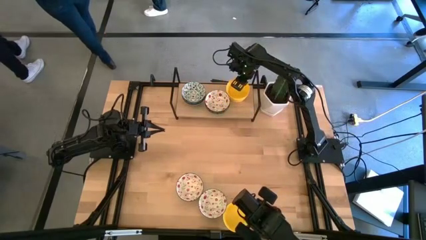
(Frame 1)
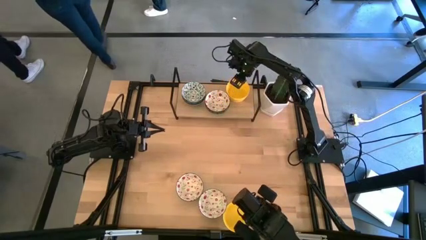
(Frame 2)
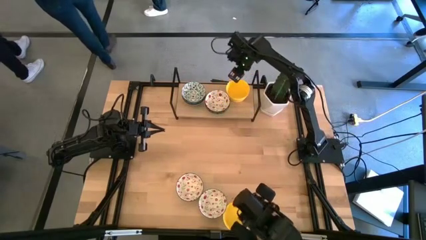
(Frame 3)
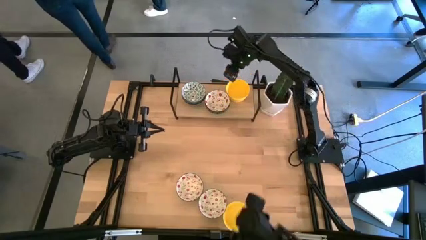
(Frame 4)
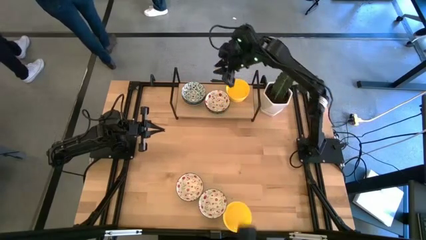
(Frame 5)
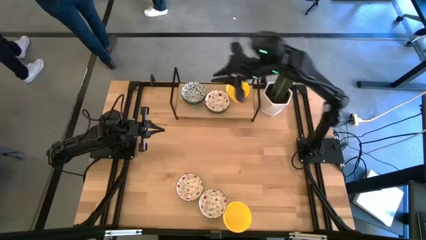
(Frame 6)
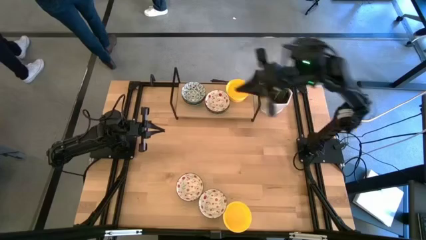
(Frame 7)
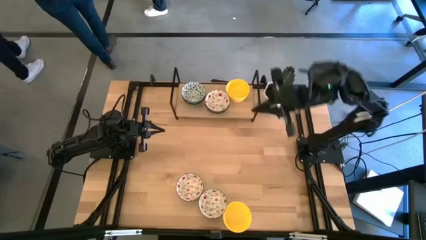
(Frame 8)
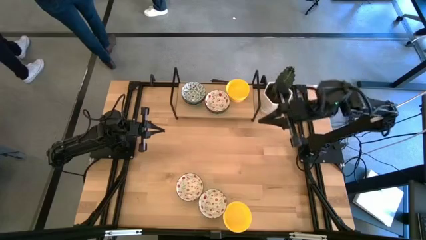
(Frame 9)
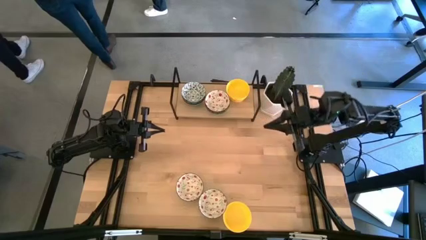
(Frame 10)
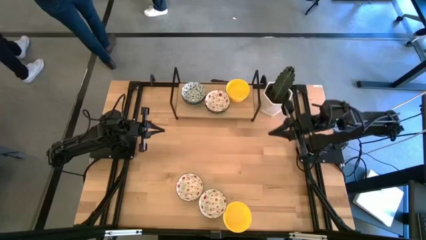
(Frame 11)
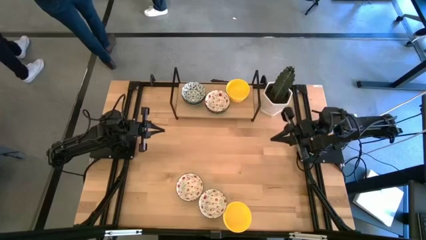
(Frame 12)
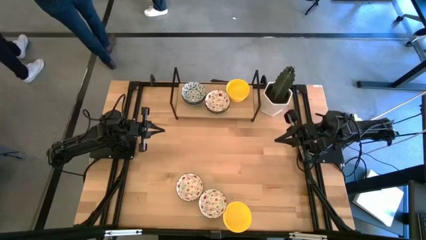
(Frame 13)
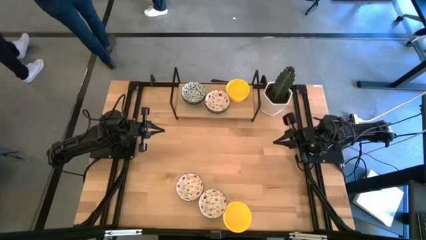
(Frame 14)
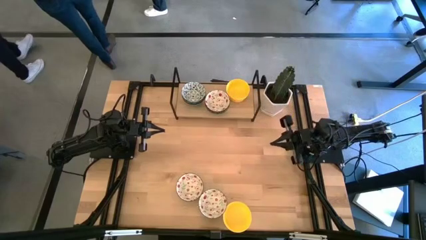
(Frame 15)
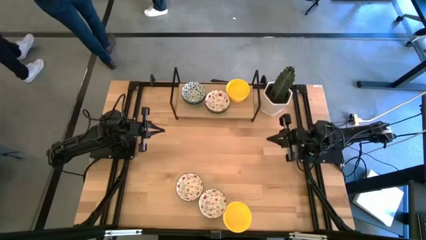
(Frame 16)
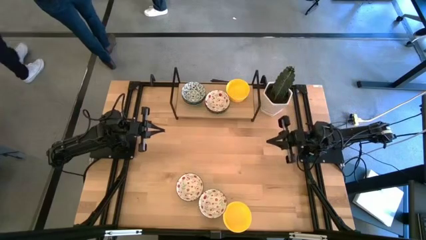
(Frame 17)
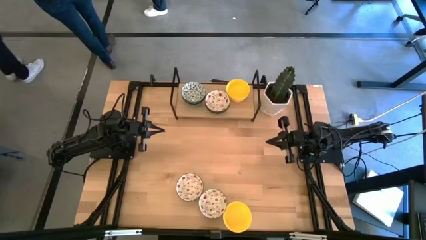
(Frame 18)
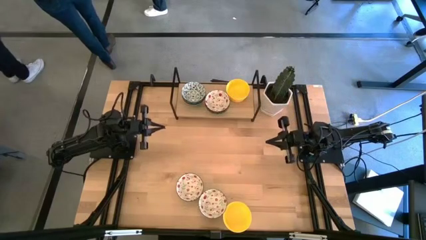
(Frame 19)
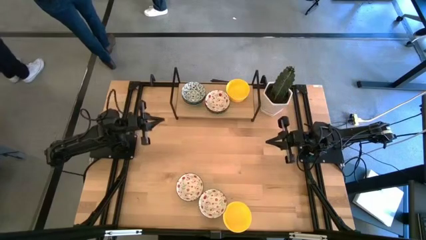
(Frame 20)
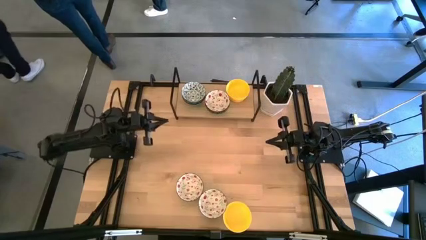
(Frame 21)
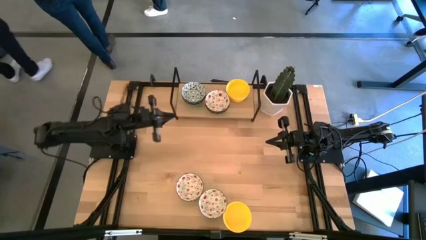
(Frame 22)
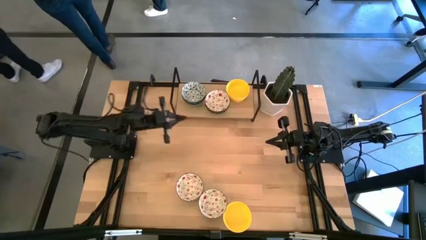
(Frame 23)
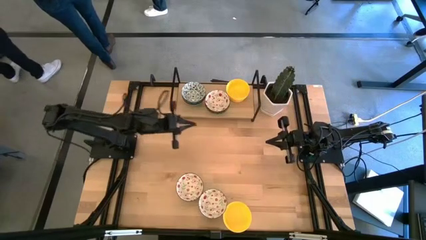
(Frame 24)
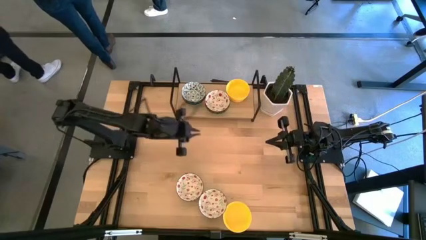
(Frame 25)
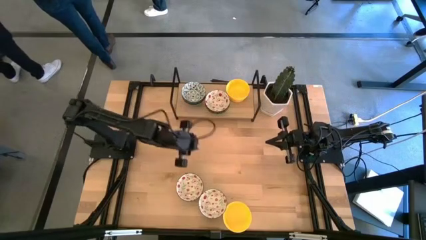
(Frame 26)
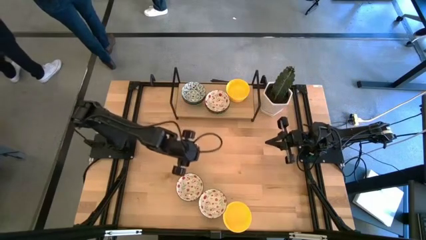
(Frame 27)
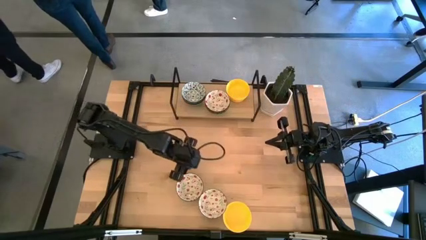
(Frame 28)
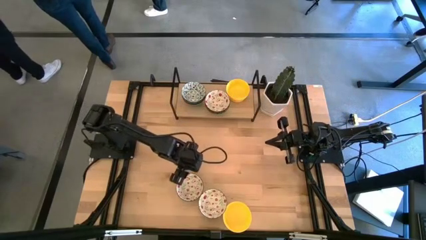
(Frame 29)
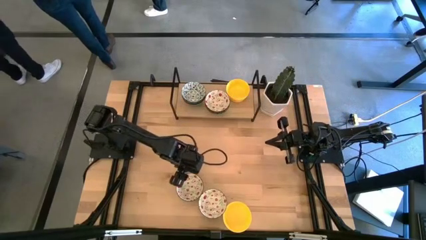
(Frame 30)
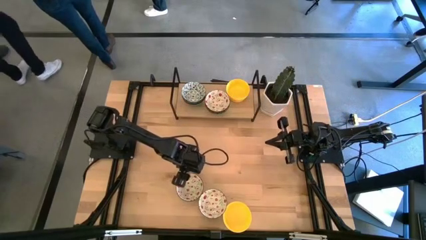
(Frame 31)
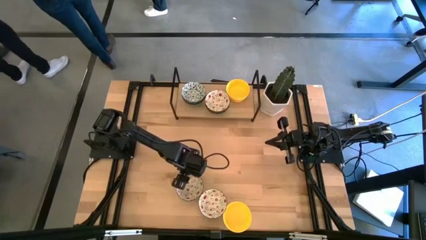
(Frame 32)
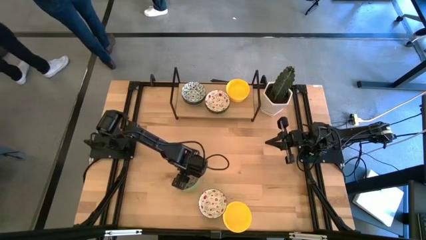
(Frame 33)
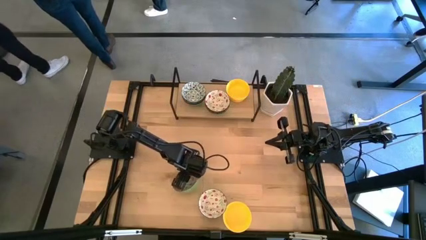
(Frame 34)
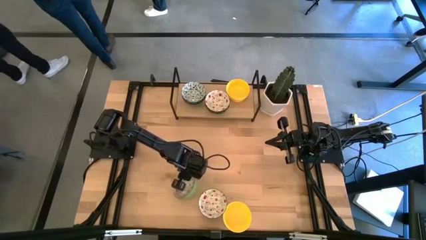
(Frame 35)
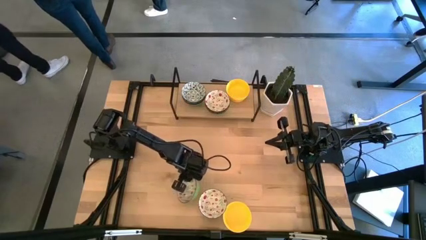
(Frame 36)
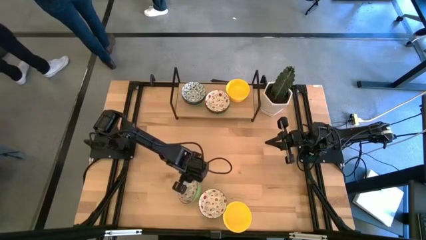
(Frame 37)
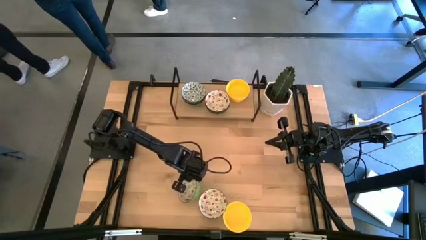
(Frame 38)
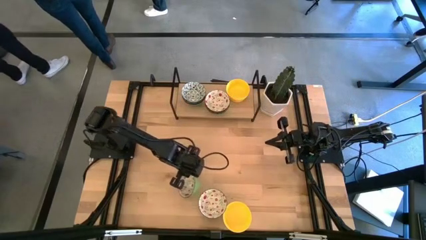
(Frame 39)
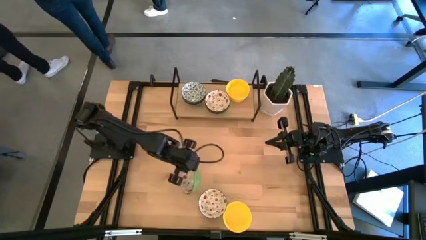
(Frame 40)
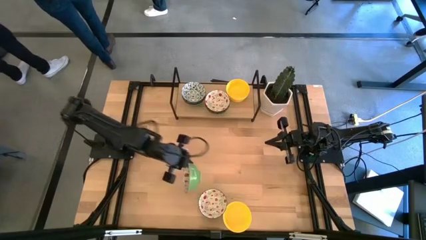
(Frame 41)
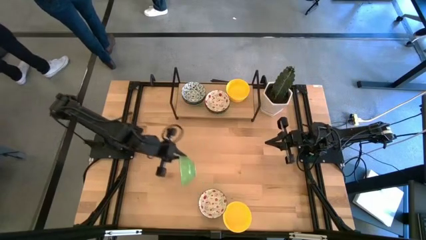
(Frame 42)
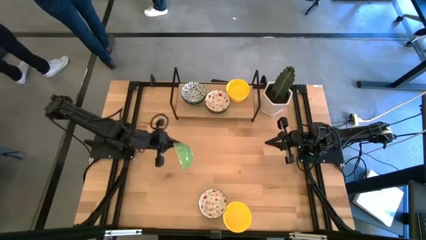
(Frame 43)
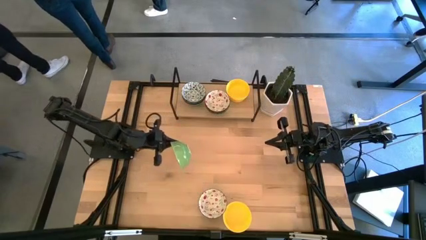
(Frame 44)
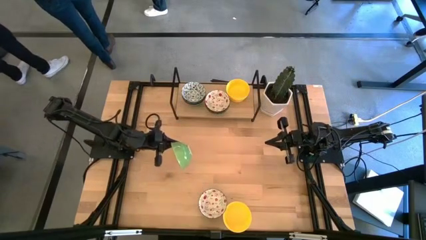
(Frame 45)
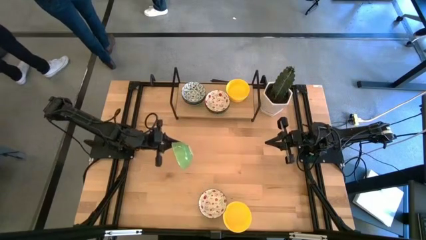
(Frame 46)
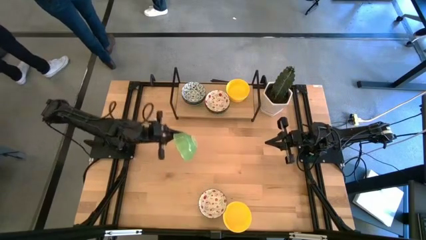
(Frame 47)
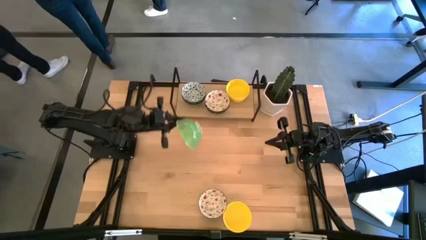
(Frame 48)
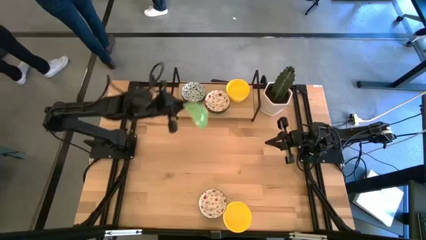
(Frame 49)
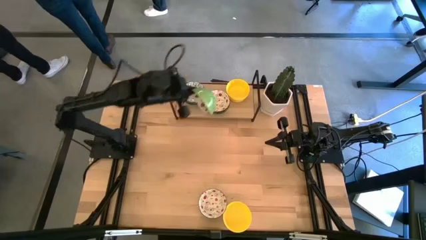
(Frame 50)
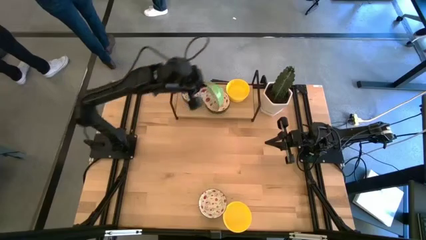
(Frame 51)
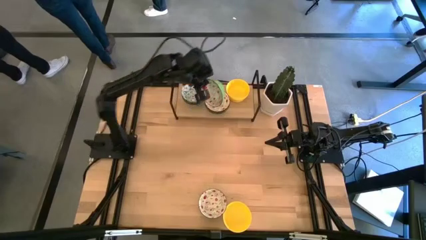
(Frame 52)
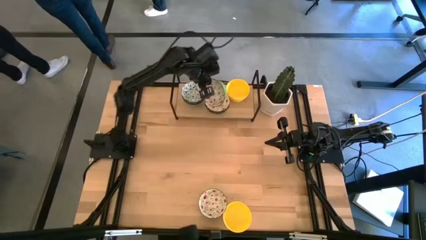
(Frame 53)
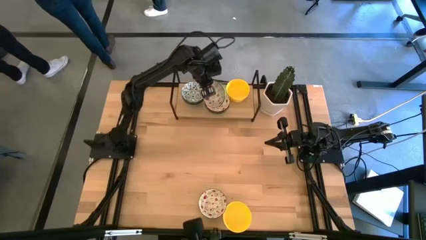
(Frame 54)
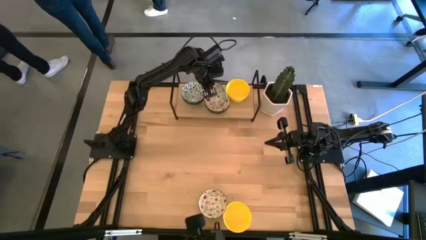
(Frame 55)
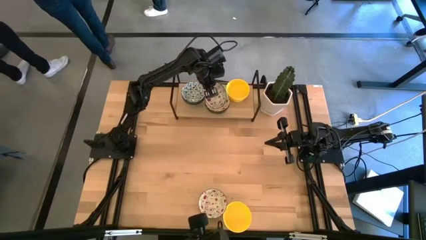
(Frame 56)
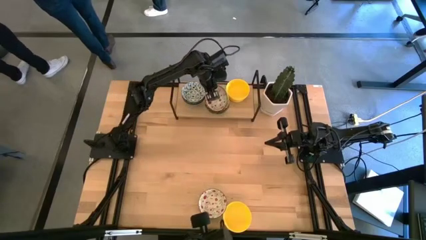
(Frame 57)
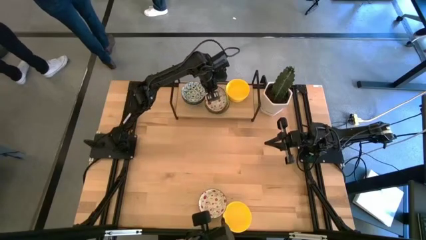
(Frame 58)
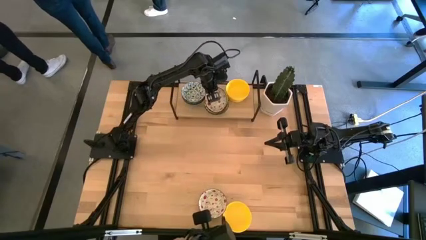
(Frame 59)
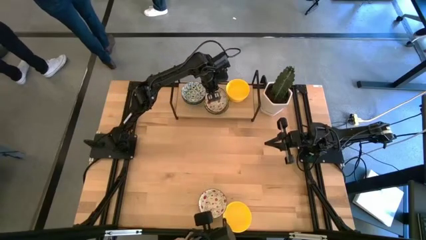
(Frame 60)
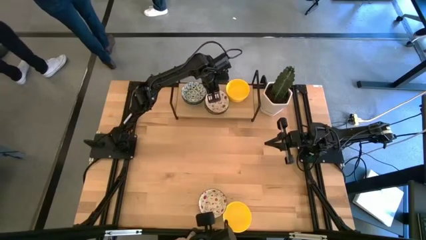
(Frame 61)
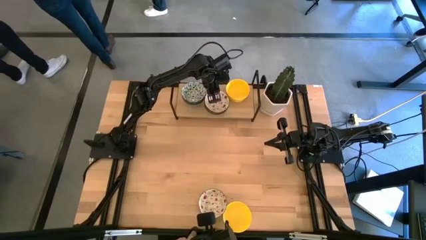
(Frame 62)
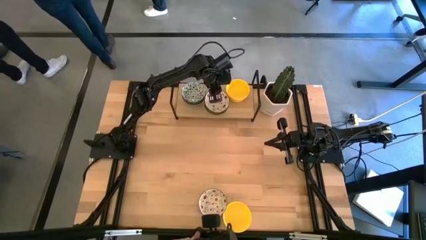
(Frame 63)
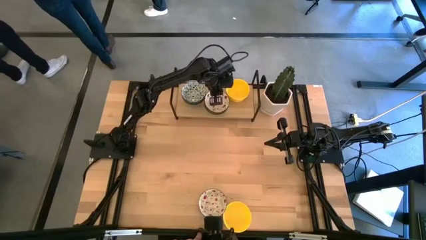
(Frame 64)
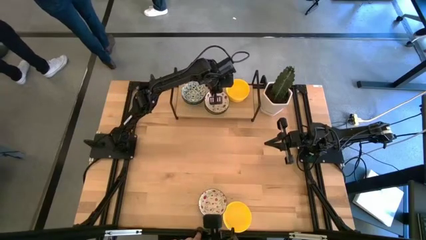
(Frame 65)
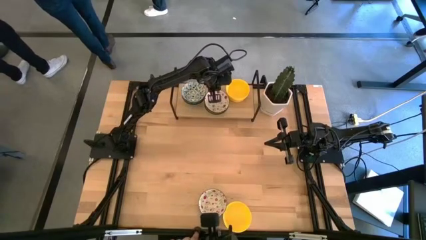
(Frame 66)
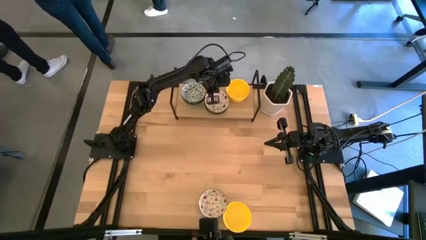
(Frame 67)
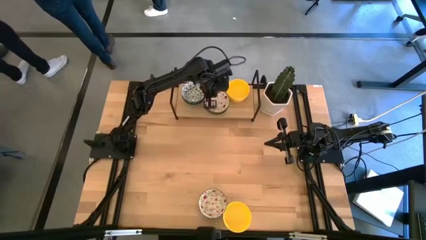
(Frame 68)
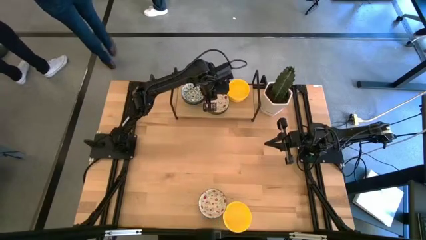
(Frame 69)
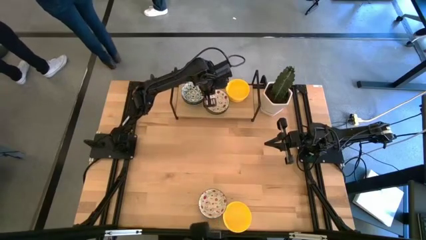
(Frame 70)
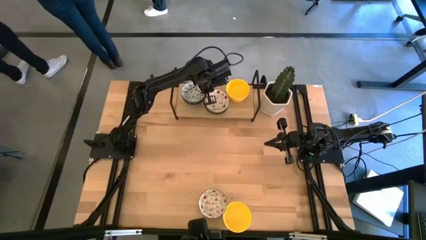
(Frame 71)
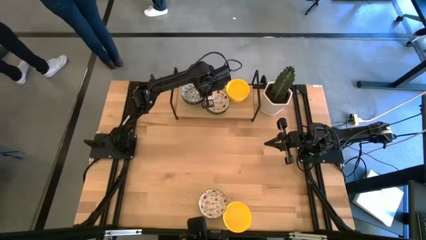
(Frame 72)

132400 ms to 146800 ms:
Task: Pick & Place Mini bowls
Stack the red patterned bowl on the red patterned bowl on the shelf

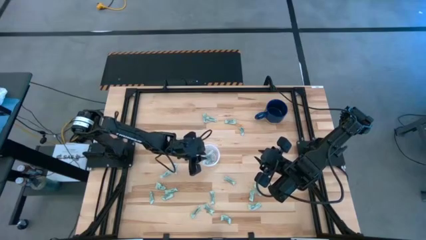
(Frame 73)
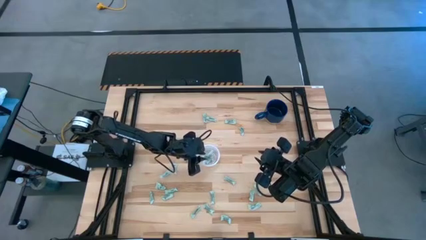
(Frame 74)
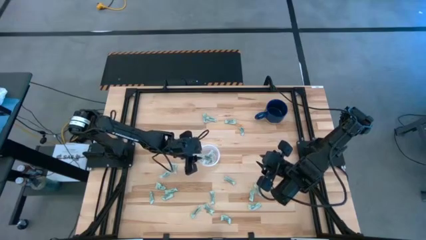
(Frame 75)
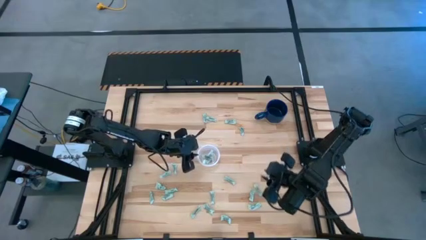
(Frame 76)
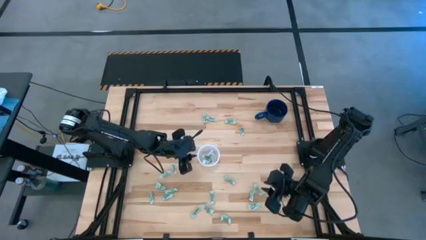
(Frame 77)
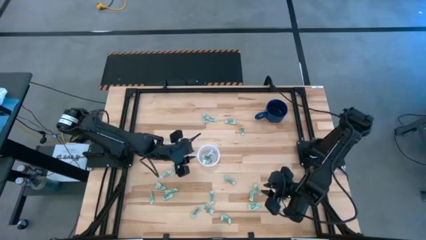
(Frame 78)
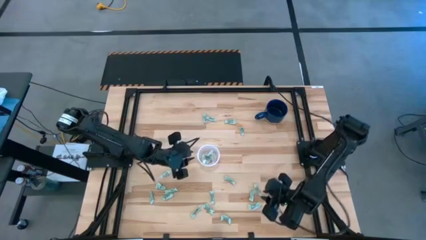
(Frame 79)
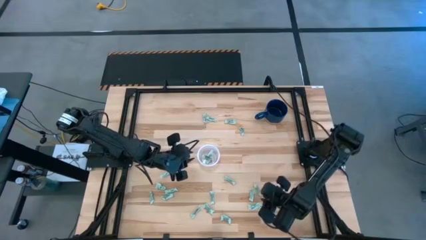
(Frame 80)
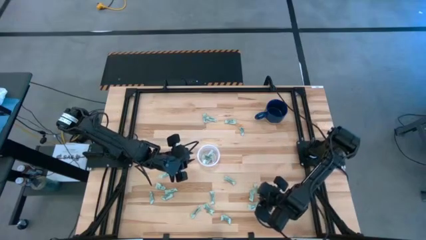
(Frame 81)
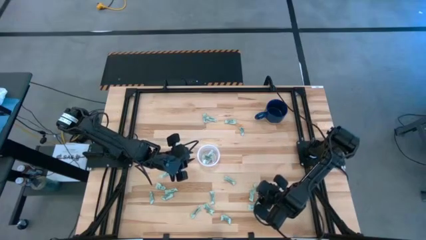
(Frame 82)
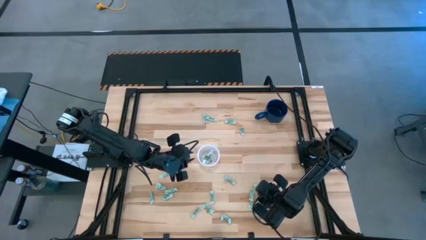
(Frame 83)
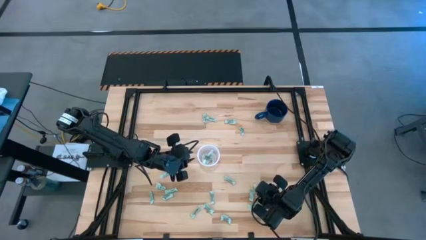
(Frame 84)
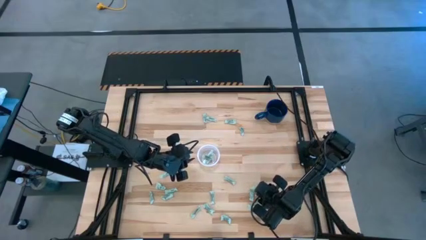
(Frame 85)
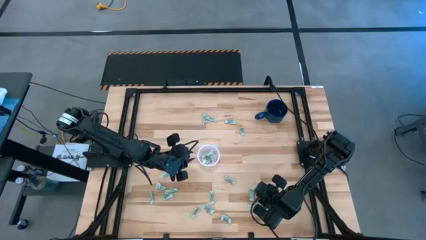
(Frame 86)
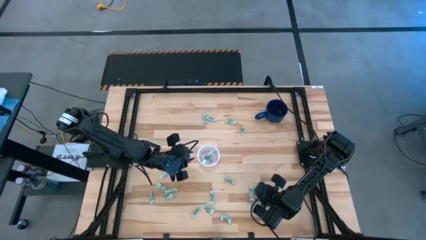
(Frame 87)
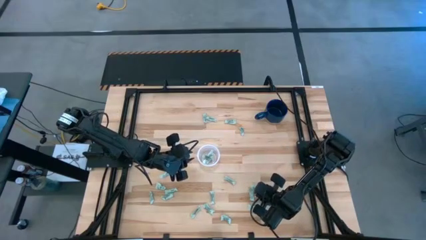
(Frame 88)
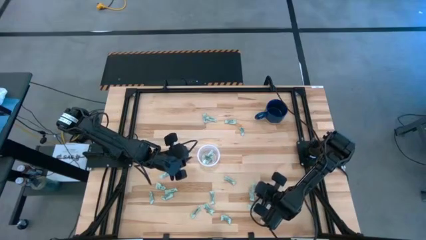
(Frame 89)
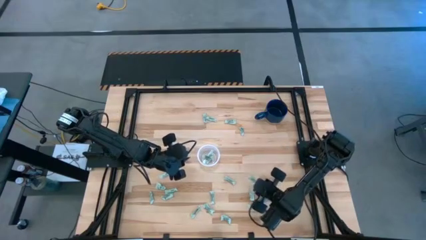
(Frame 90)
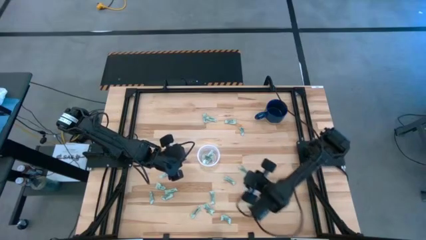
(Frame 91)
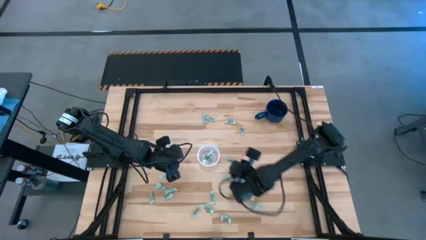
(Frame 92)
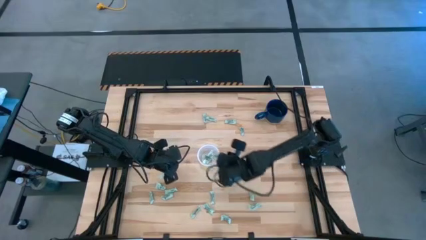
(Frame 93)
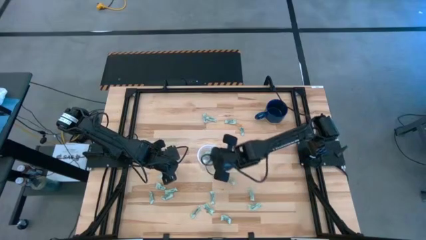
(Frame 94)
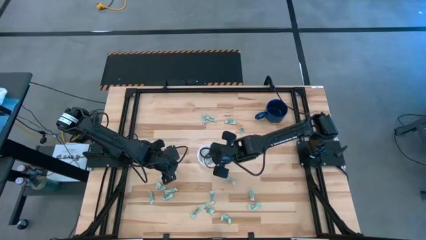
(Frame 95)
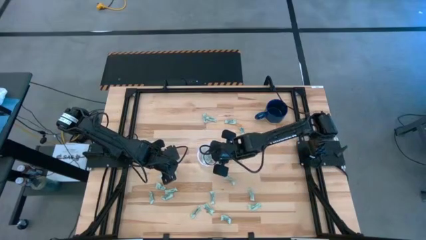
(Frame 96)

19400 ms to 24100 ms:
Task: Pick and place items into bin
Put the stevia packet into the transparent bin
